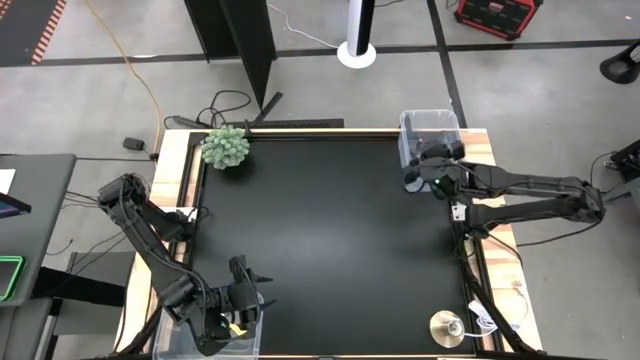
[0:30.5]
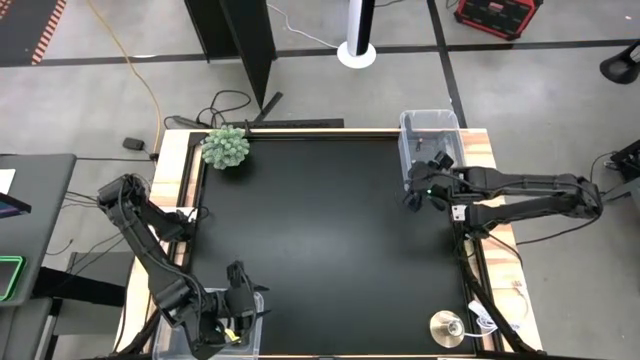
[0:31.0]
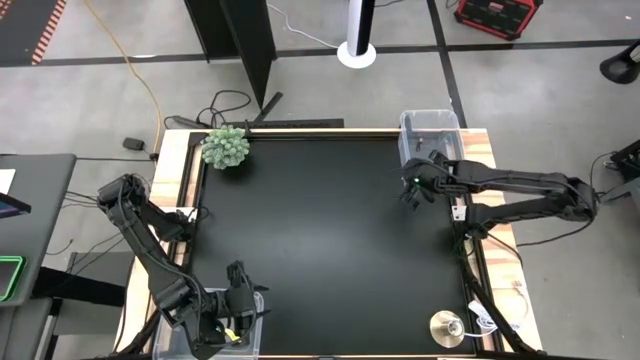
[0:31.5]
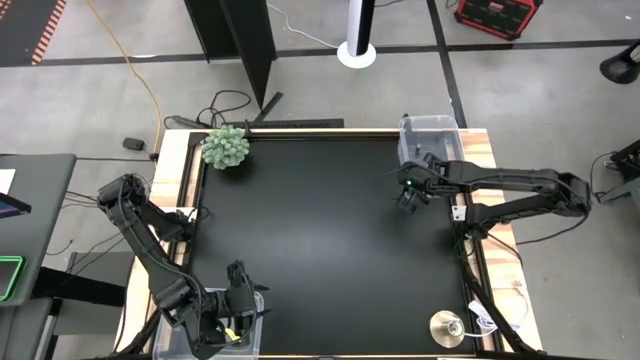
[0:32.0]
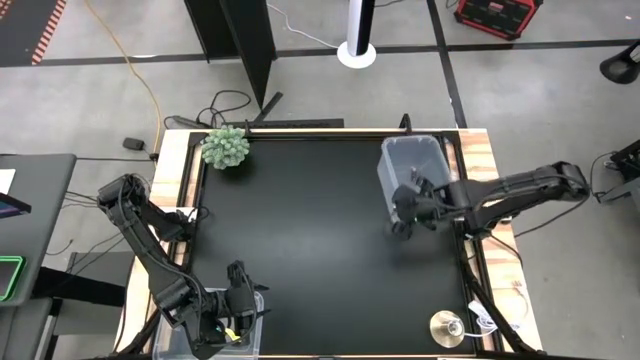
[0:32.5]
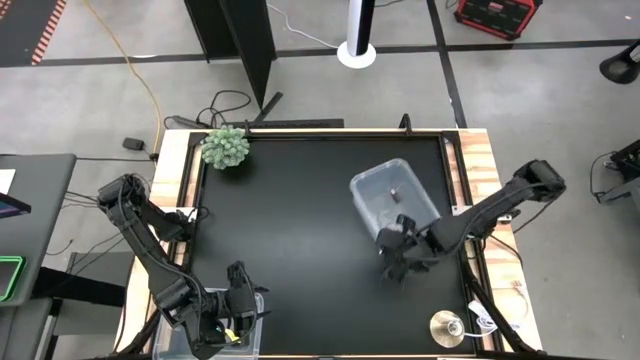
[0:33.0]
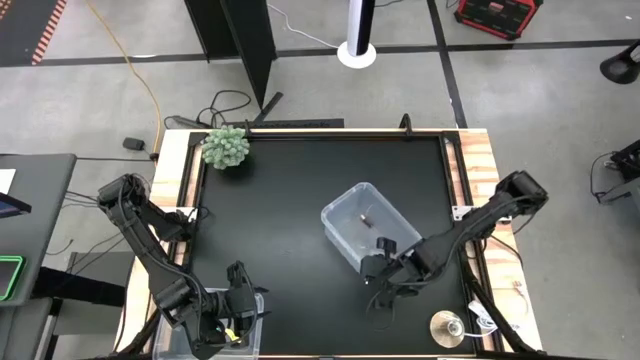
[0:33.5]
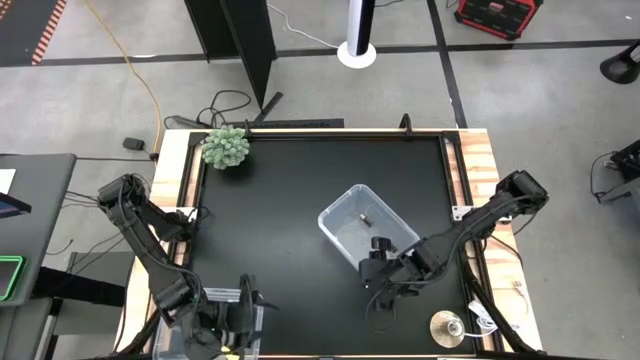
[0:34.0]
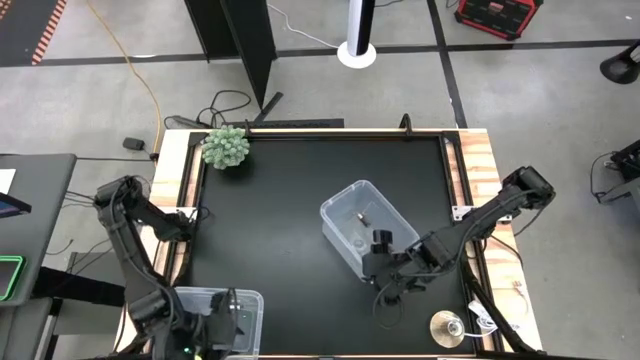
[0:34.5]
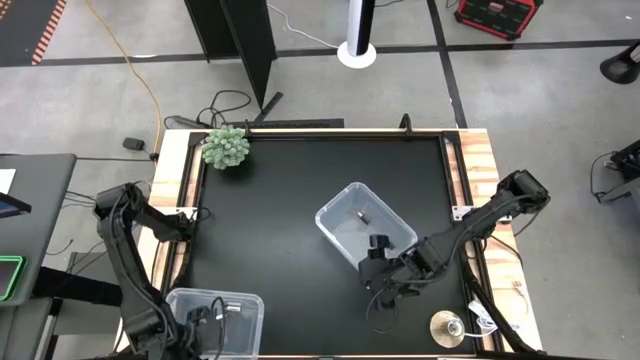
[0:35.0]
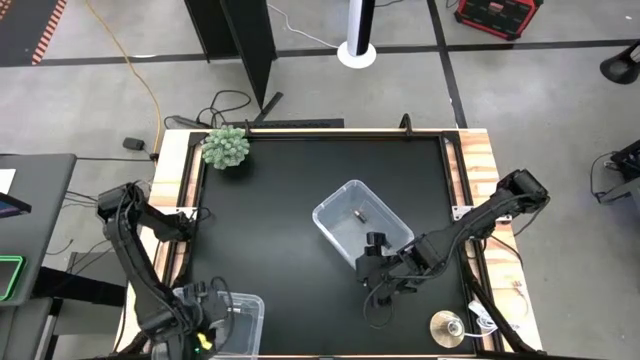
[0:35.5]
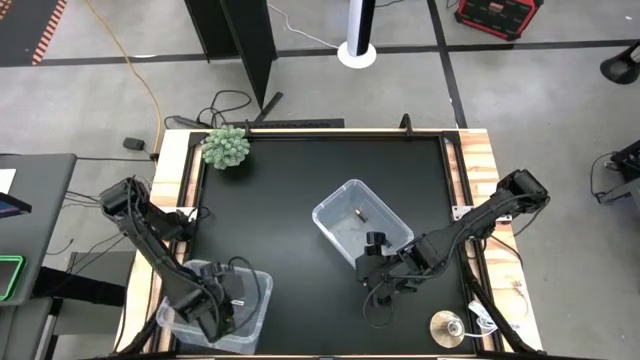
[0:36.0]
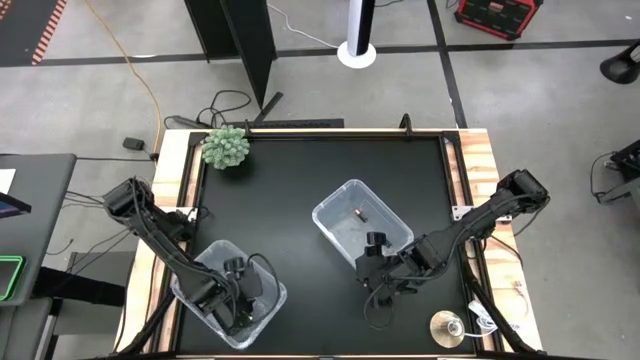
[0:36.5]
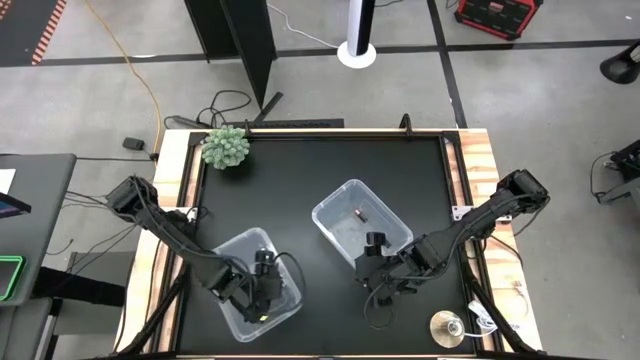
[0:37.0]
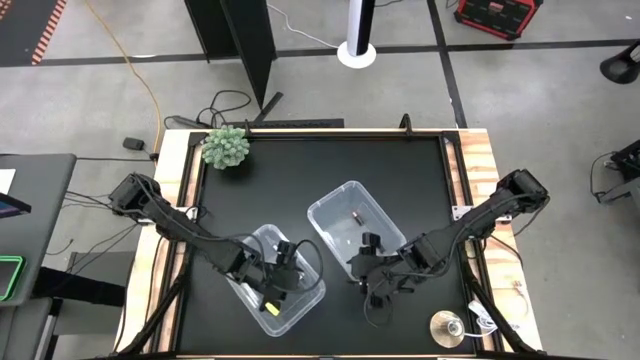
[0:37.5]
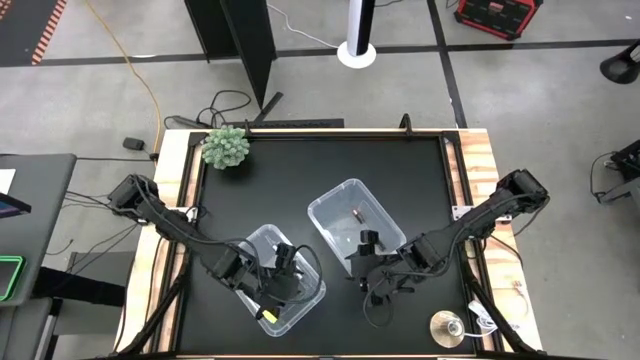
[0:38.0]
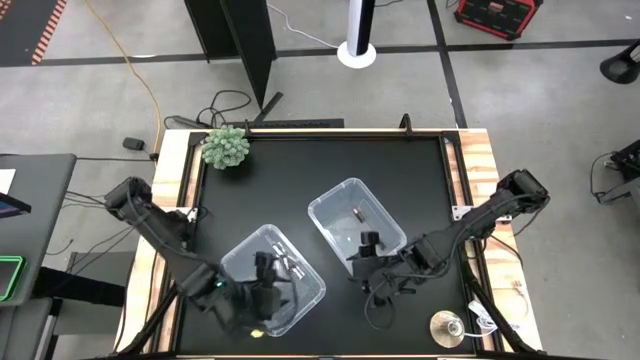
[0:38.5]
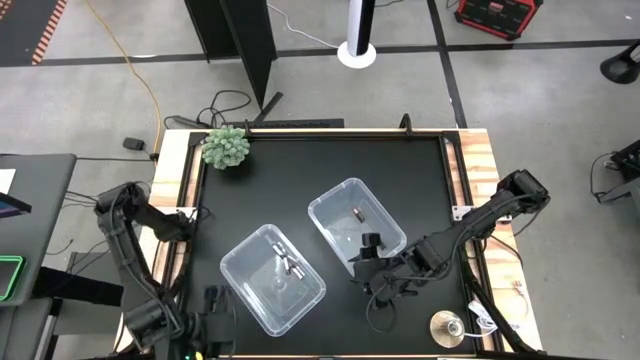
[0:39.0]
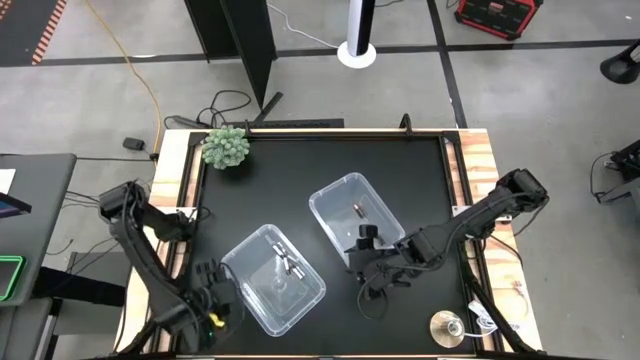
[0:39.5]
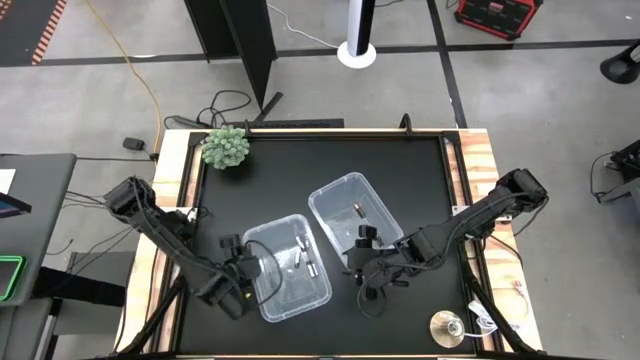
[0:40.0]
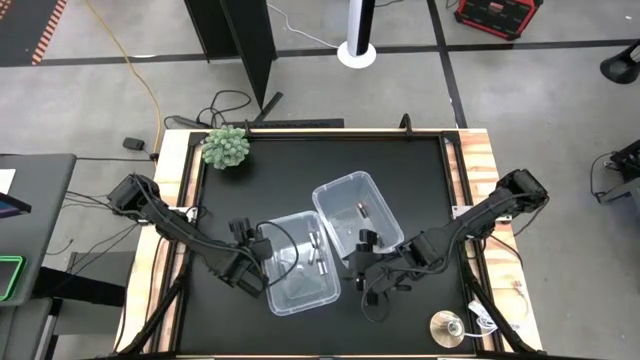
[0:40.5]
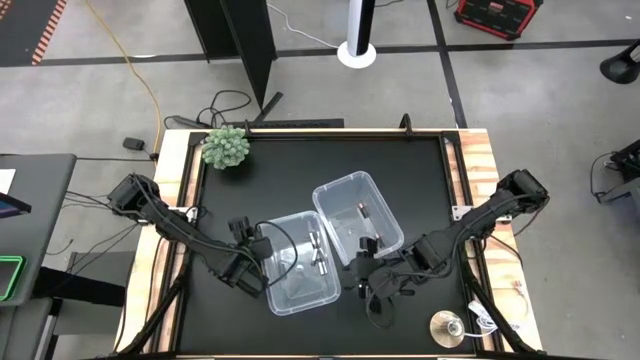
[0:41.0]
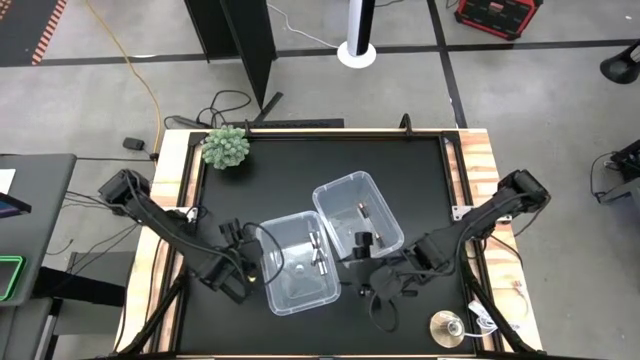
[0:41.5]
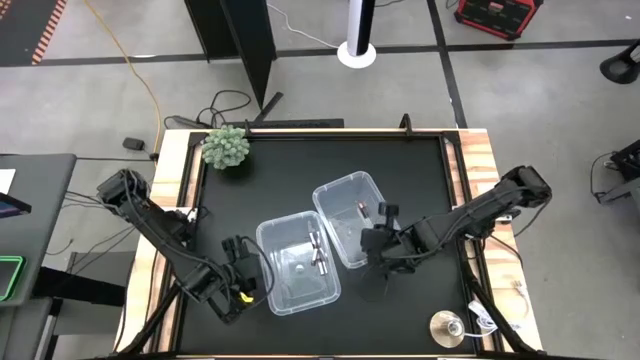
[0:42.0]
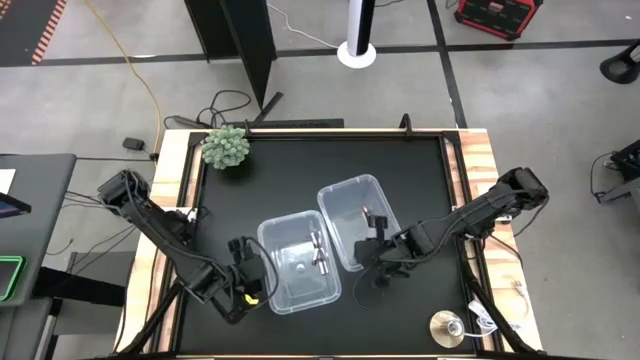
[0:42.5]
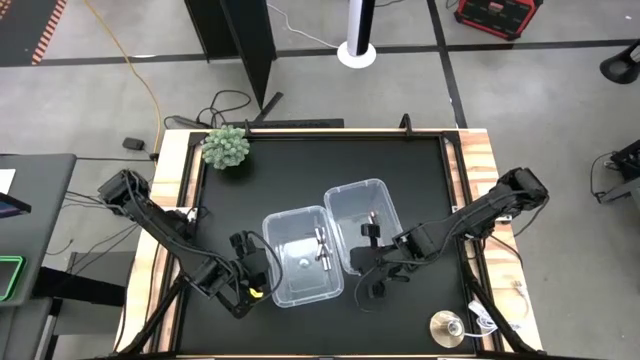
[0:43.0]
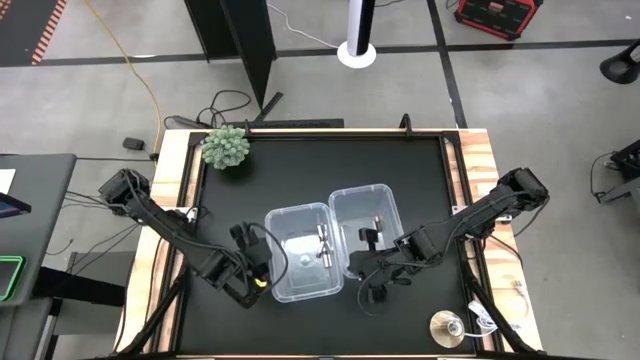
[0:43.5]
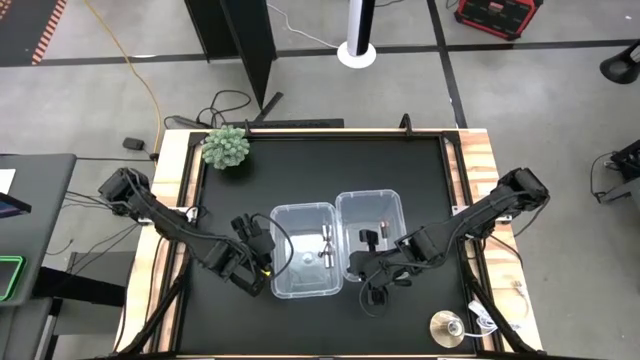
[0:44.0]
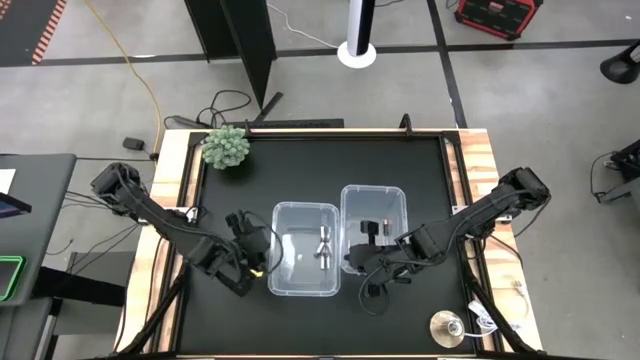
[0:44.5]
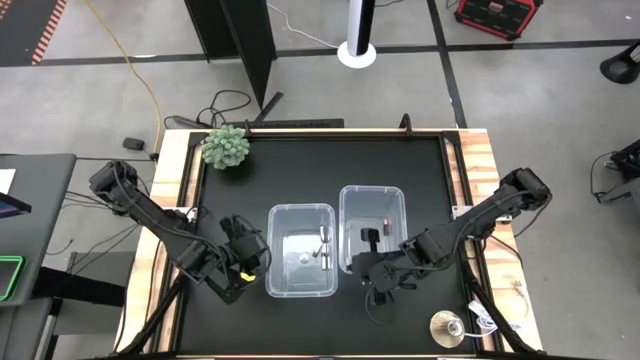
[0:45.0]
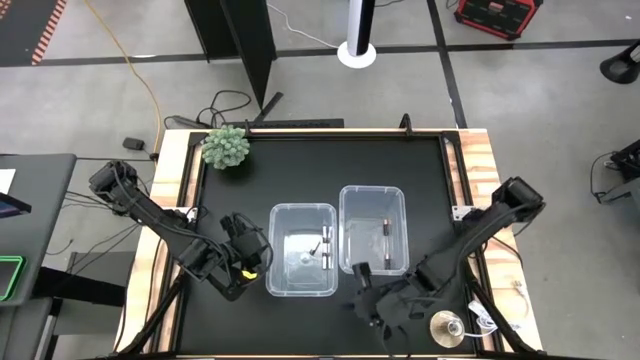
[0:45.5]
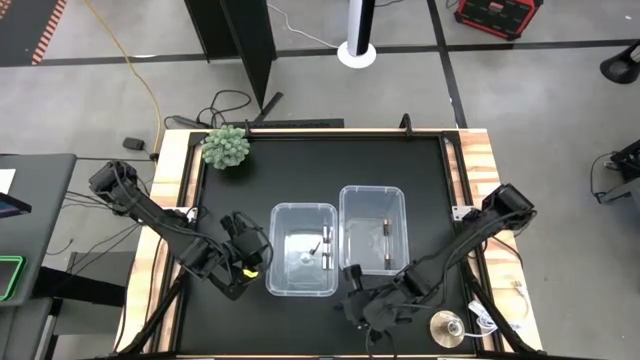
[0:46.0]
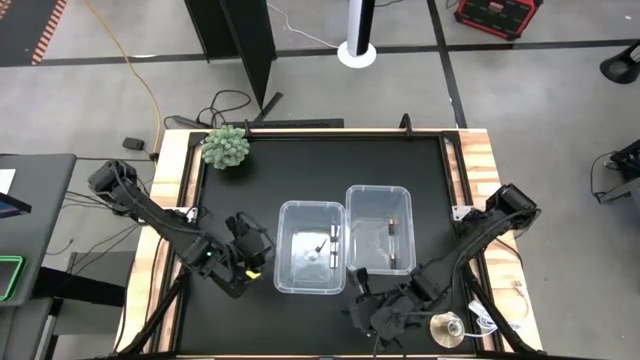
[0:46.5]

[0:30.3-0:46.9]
Task: Sort batteries
Move the transparent bins to the center

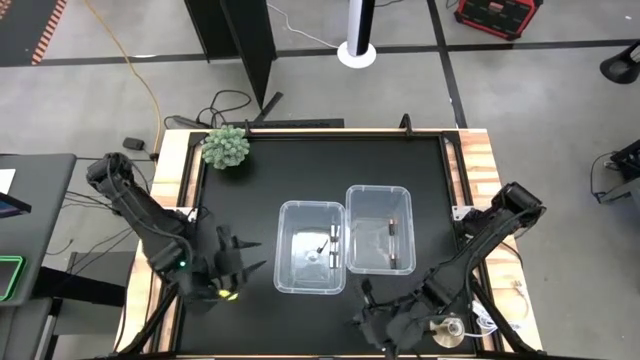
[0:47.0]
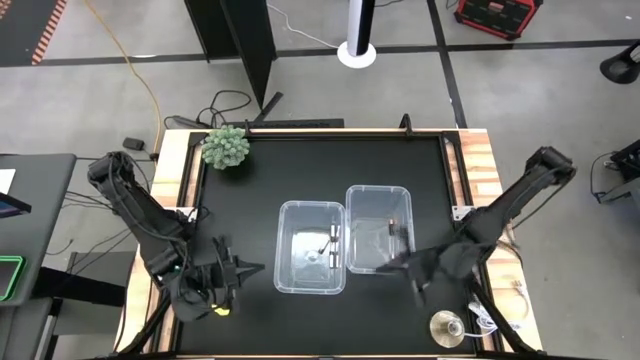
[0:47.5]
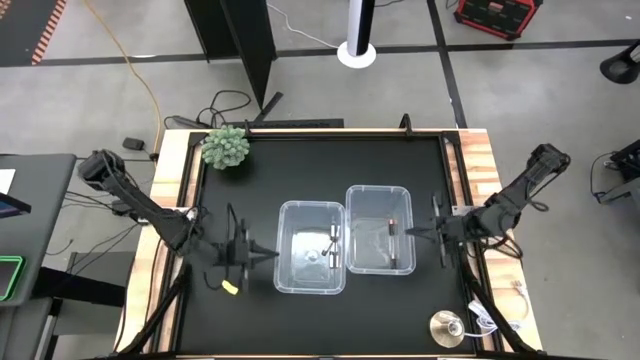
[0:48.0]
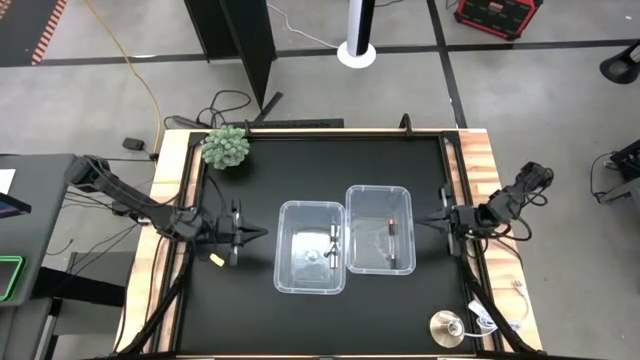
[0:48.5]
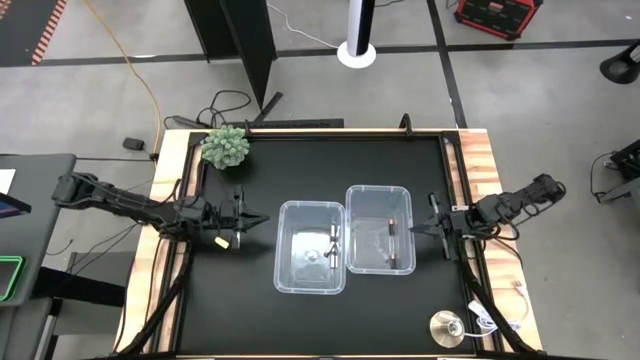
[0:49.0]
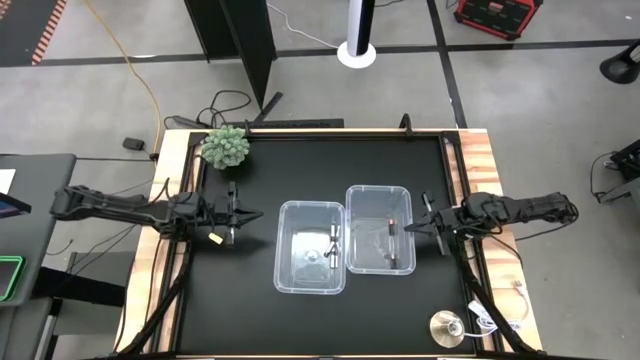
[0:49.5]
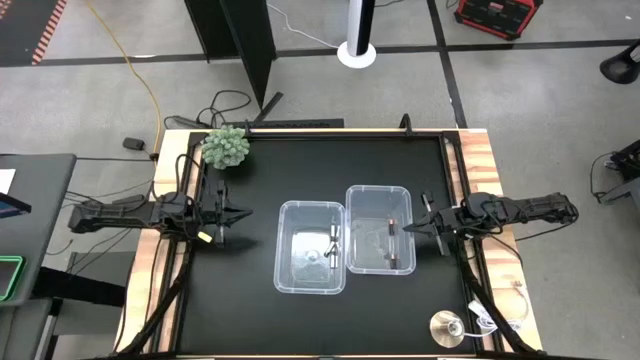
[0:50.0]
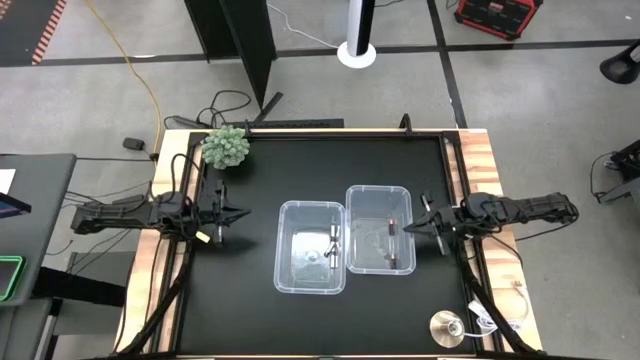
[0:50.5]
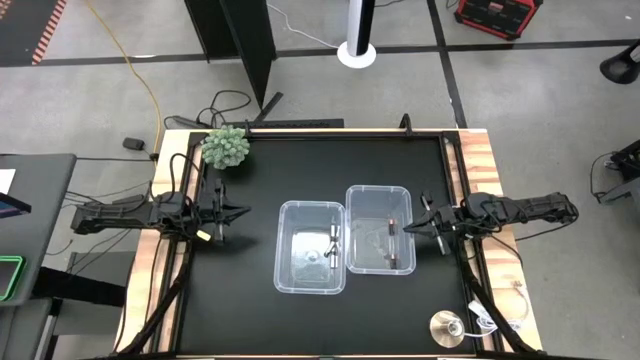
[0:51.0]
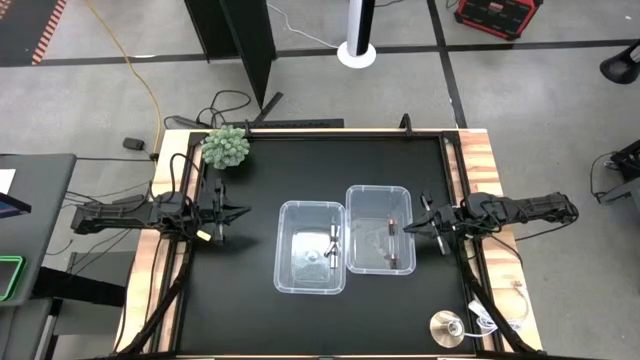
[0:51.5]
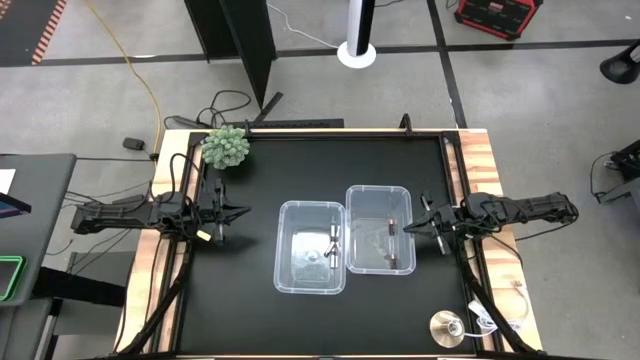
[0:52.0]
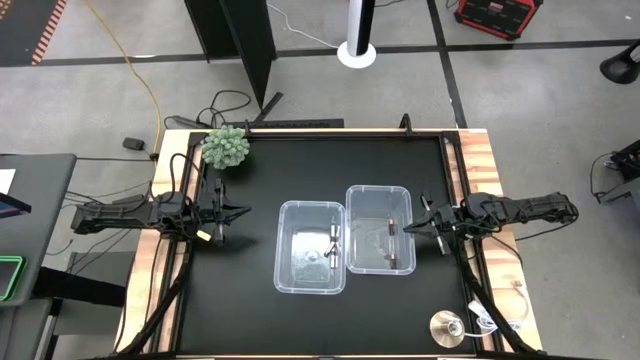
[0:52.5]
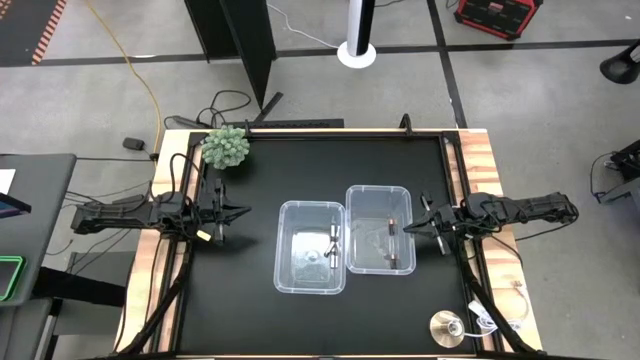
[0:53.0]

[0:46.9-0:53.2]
Return to Home Position
